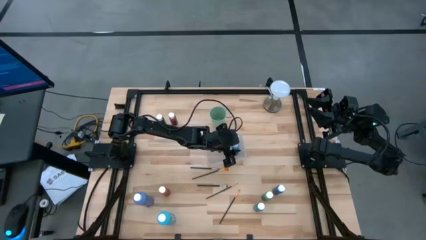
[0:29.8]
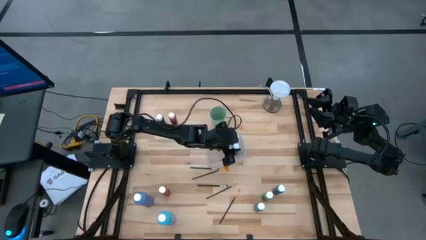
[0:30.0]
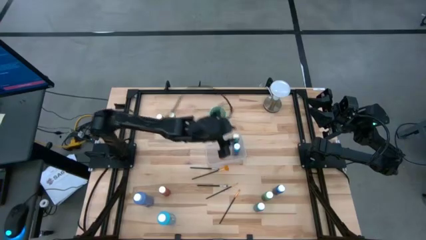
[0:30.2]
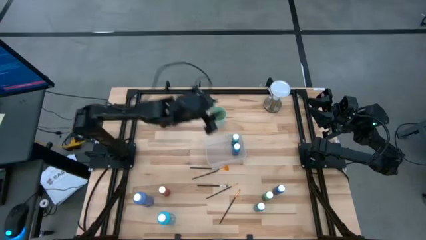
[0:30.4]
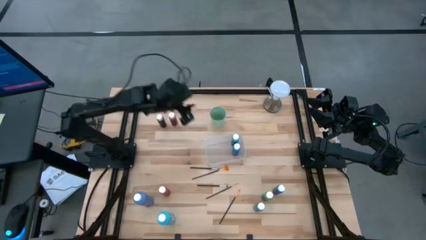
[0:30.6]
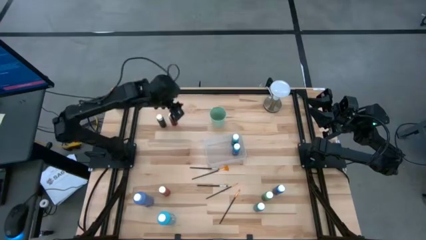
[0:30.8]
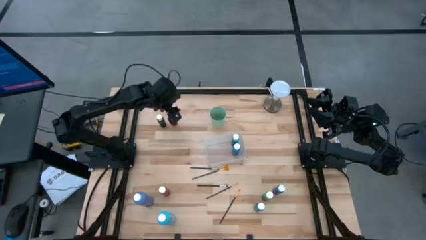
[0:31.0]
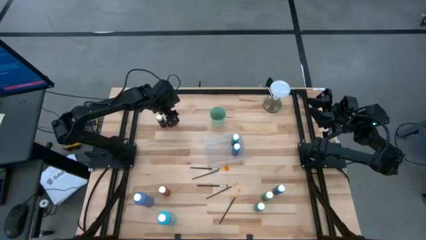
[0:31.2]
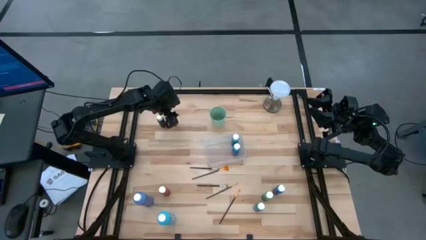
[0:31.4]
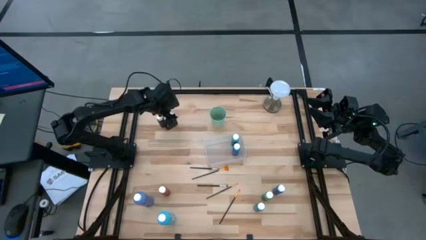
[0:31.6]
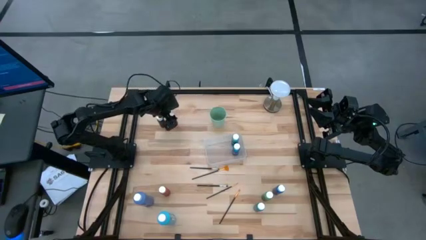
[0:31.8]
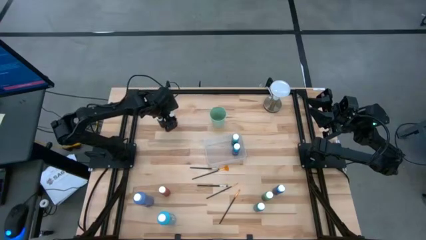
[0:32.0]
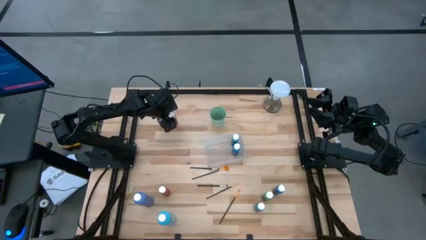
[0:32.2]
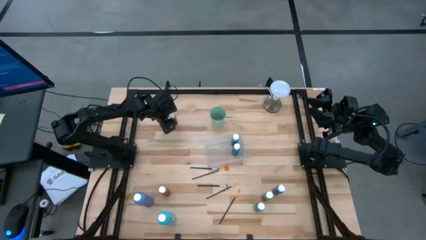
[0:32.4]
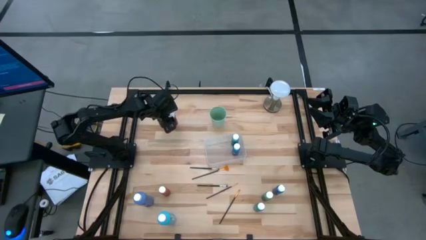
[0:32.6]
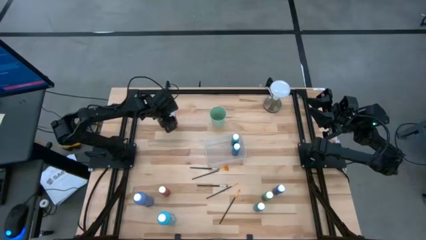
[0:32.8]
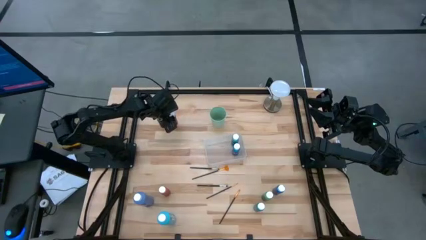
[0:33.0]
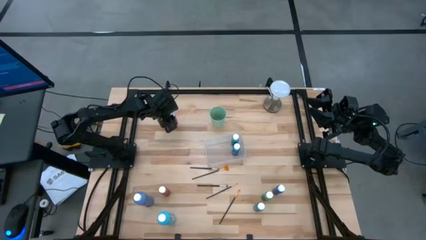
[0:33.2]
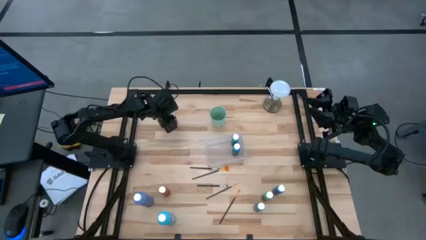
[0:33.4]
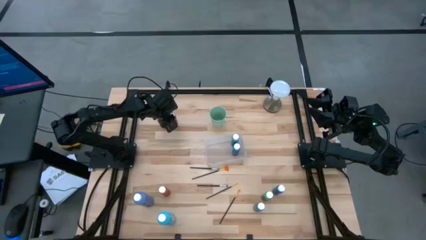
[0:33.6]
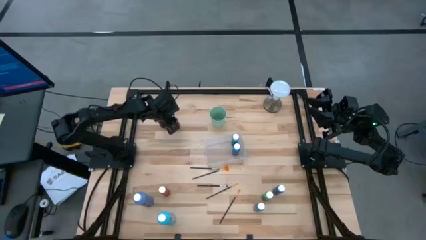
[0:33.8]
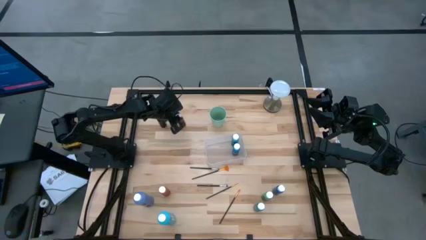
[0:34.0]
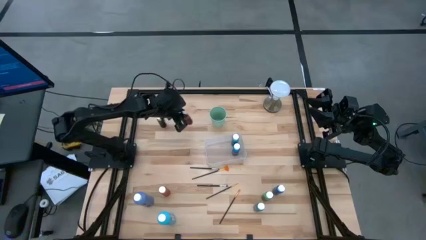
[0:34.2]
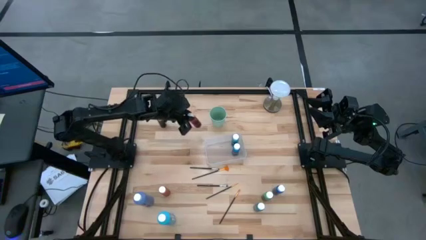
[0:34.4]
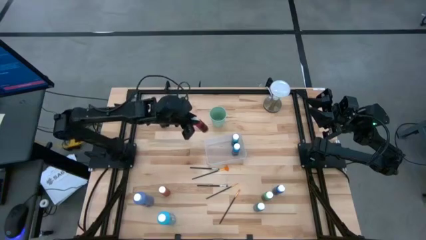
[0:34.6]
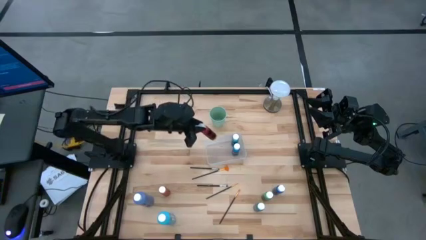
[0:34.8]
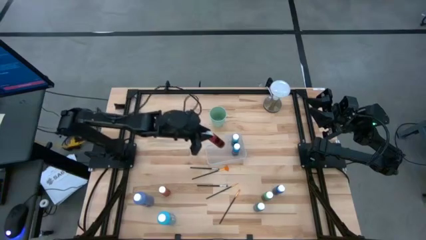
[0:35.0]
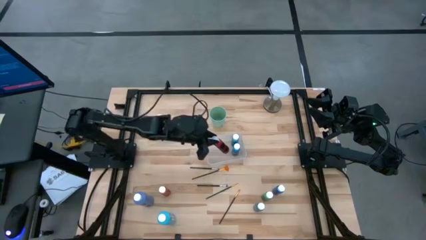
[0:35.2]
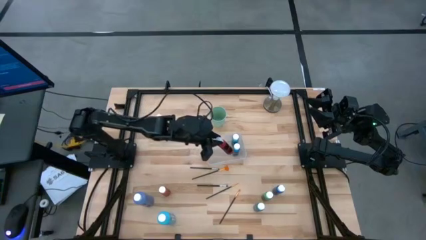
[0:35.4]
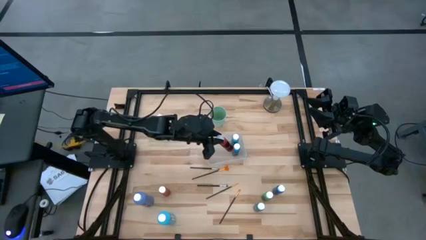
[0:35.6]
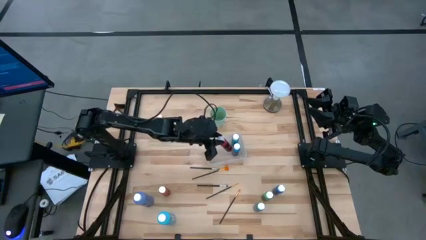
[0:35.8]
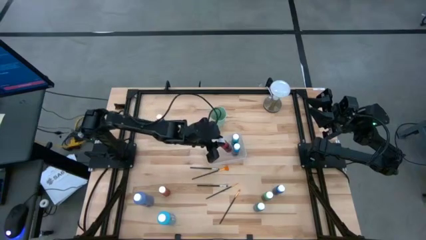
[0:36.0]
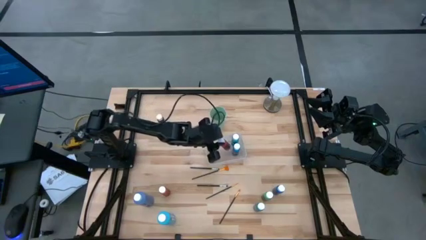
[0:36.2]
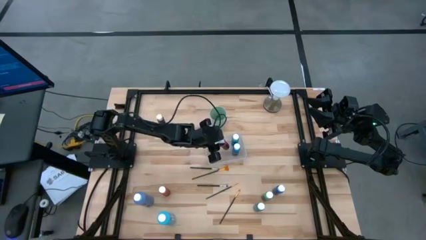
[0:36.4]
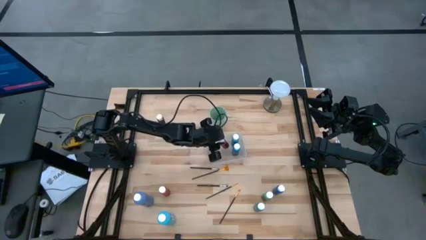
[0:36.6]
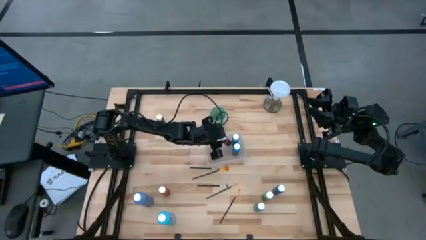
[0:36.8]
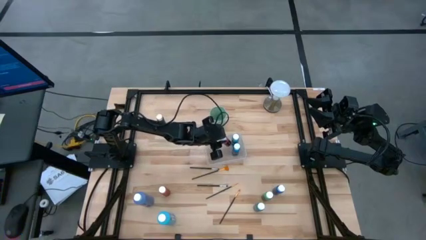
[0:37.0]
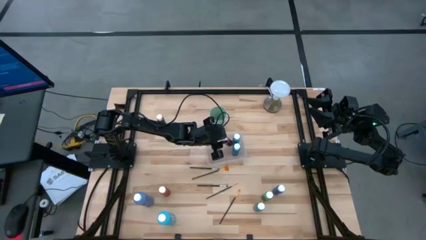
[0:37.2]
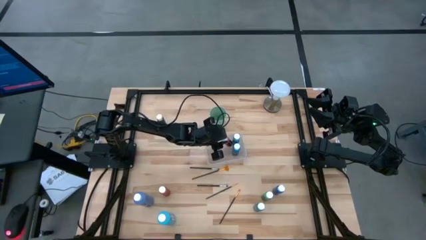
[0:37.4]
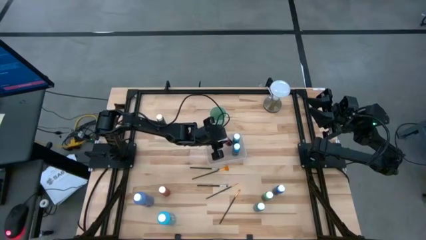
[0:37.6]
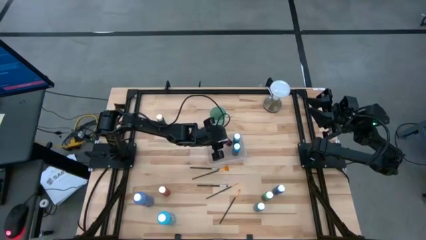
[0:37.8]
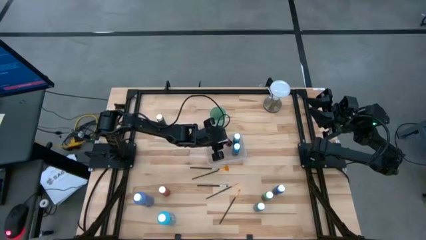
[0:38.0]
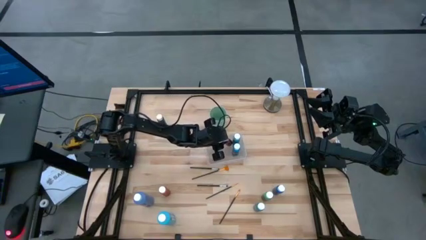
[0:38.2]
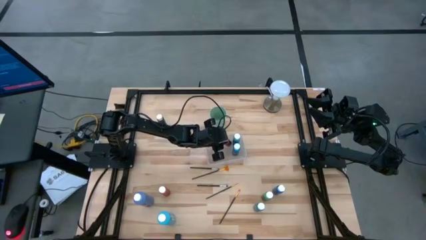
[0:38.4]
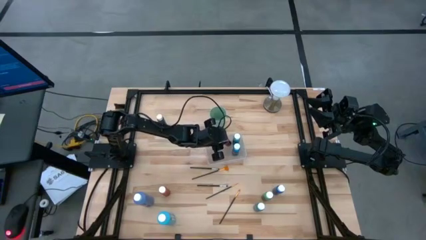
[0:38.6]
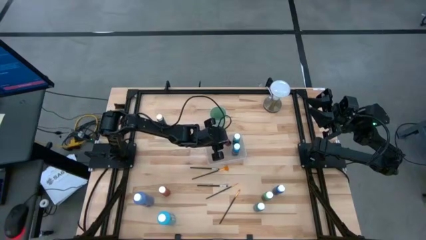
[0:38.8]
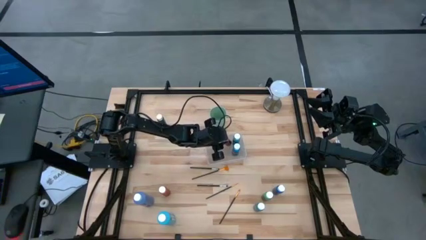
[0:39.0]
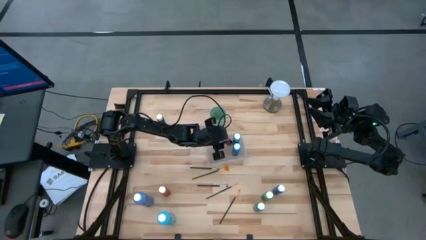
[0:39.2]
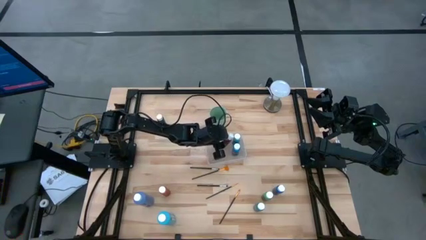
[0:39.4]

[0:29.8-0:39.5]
Task: Pick & Place Paint Supplies
Put the red paint bottle into the transparent bin

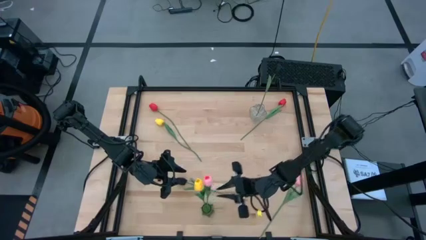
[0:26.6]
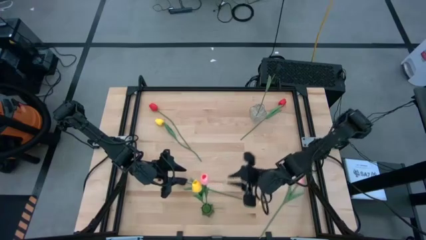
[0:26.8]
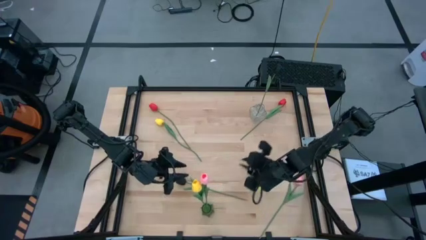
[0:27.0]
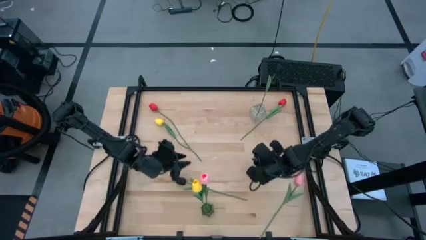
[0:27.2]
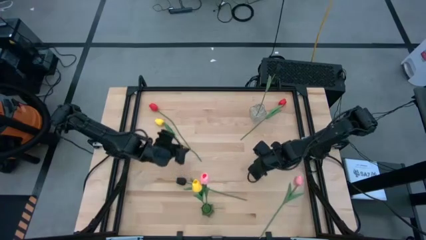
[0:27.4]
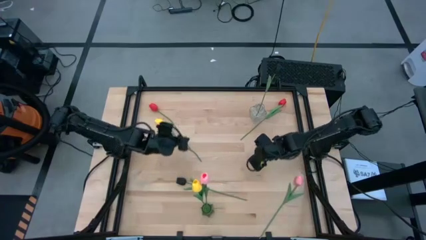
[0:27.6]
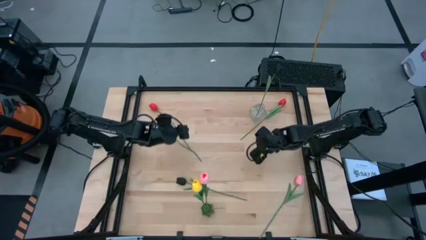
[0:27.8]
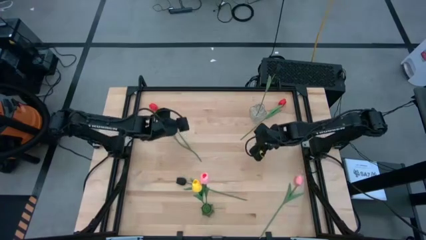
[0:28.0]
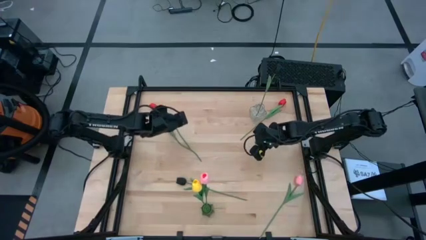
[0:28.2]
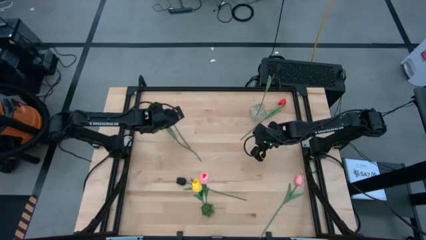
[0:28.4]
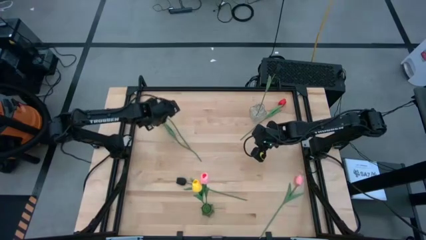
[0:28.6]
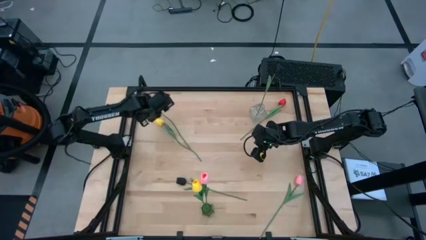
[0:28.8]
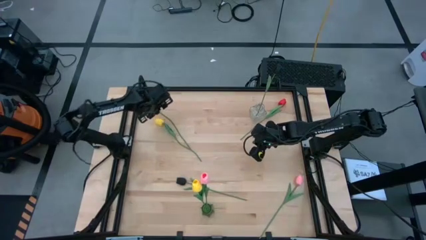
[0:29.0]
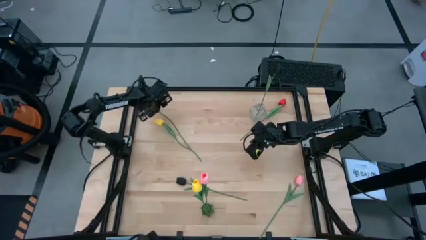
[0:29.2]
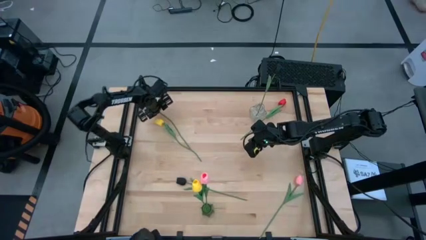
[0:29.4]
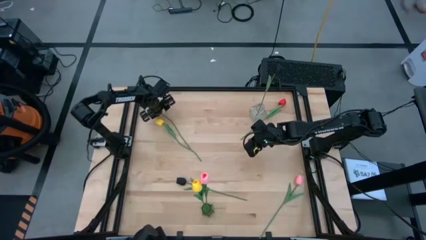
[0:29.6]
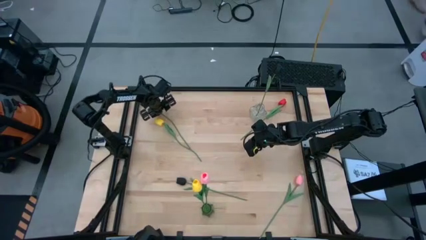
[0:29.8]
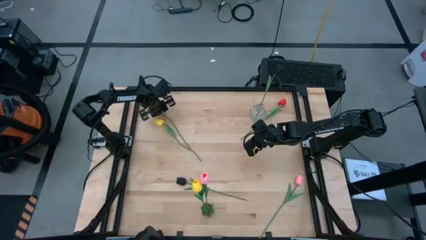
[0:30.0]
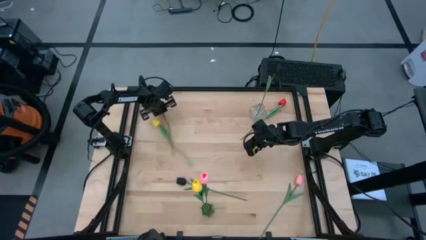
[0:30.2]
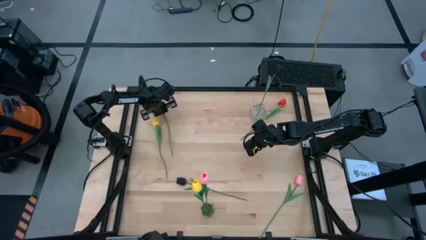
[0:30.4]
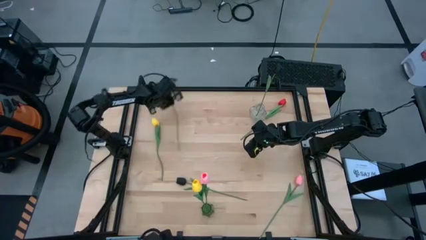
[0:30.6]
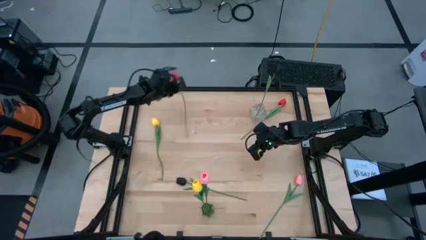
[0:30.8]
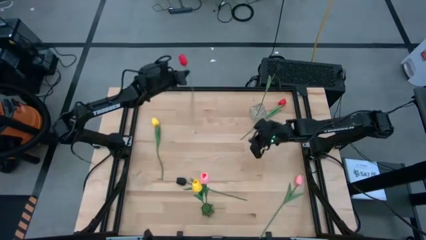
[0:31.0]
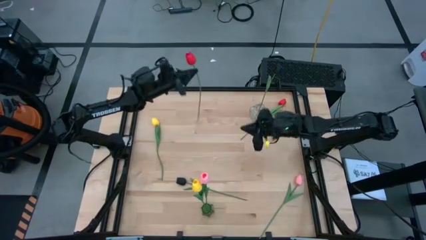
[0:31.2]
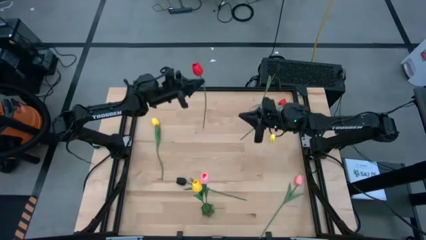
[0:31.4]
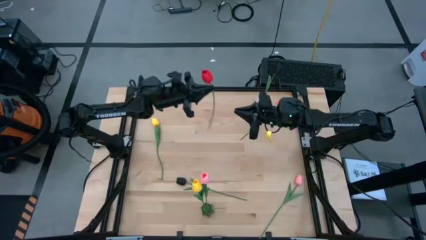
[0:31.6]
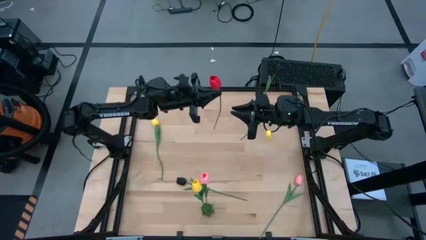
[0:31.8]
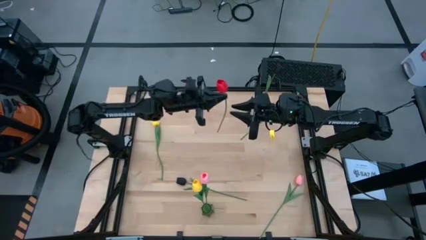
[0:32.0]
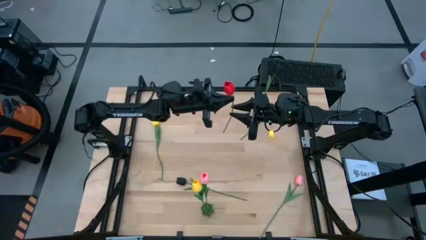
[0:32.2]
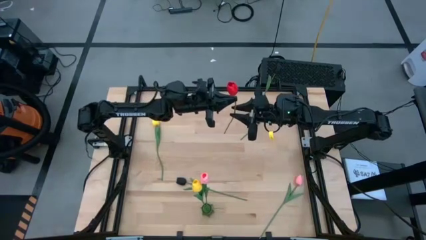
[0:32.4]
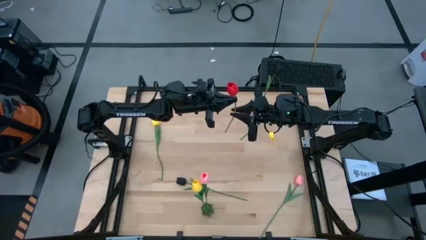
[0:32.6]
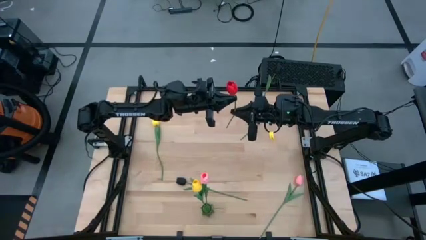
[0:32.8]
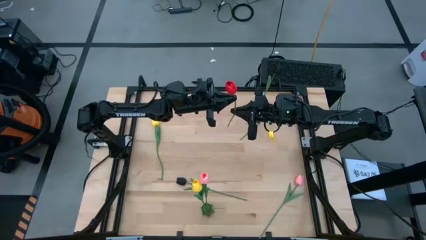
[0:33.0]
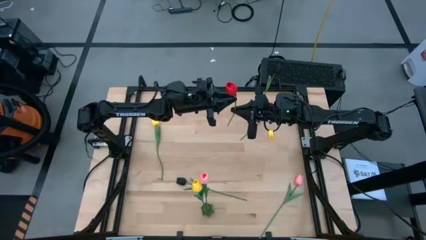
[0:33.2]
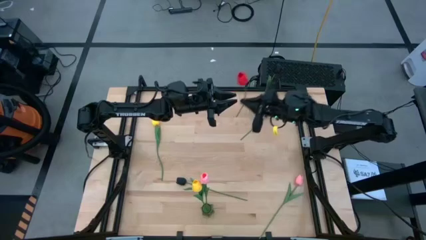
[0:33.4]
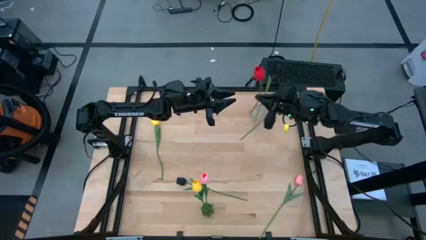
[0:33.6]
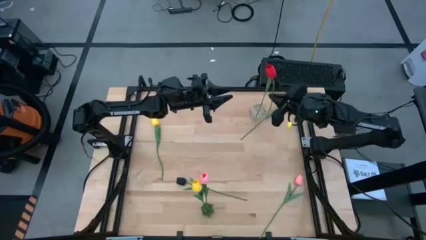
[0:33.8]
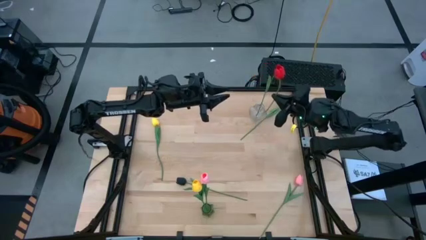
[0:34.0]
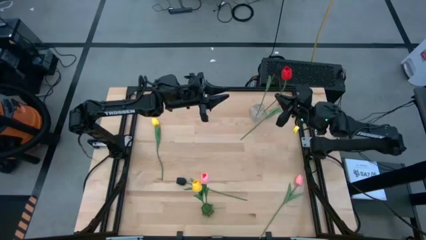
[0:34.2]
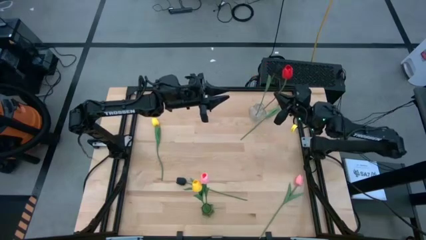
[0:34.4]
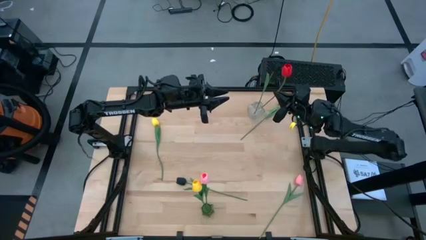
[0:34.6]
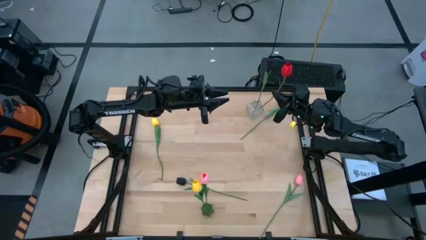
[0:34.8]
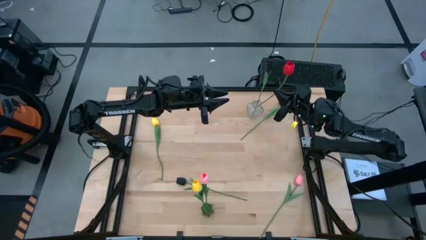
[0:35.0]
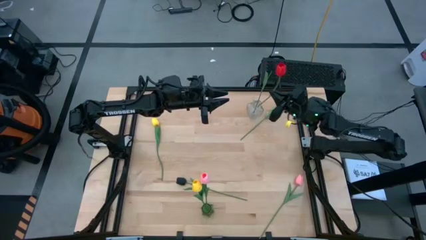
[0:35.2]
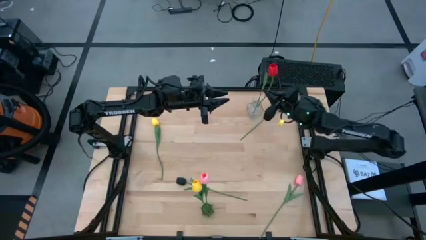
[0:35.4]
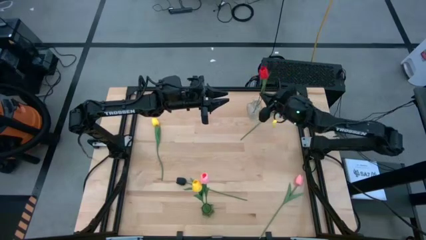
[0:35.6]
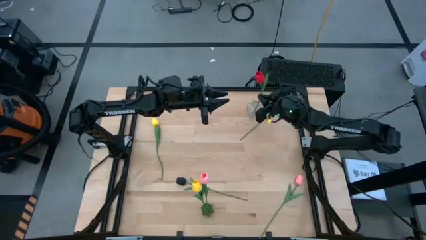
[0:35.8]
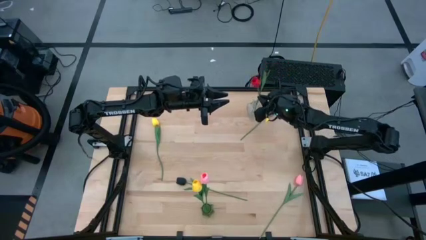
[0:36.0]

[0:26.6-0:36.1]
Task: Sort flowers into vase by color
Put the left red flower into the transparent vase
